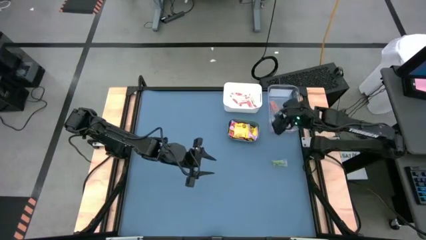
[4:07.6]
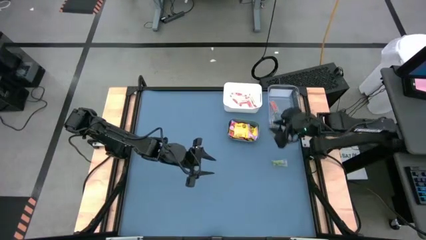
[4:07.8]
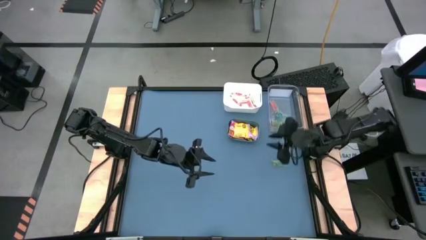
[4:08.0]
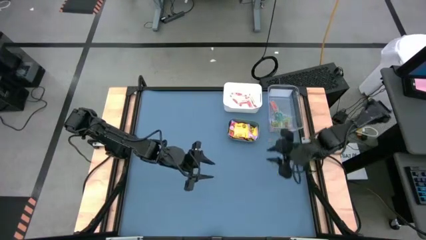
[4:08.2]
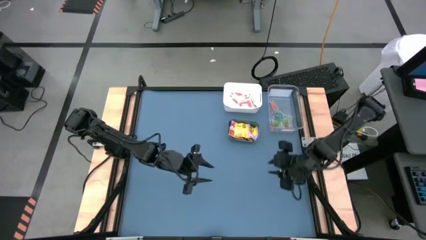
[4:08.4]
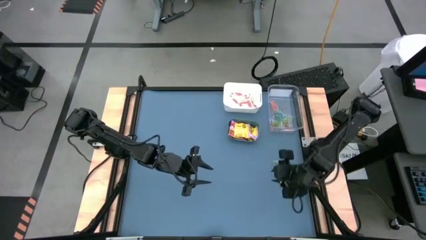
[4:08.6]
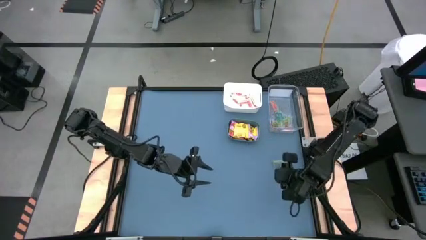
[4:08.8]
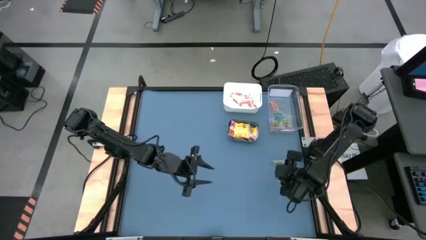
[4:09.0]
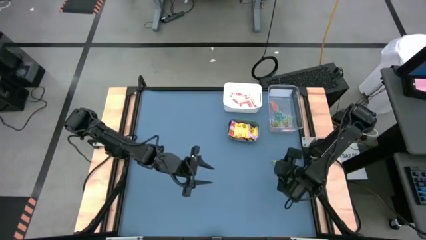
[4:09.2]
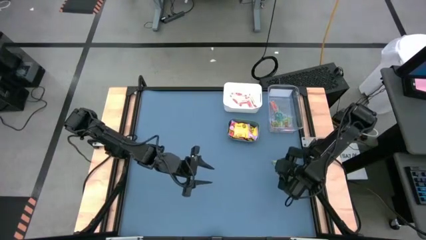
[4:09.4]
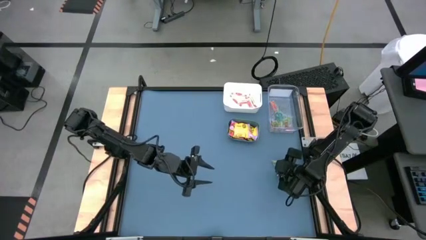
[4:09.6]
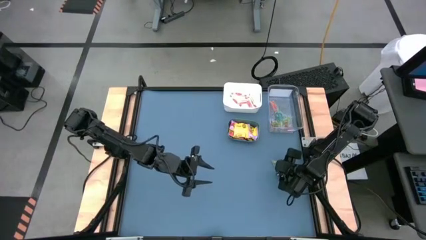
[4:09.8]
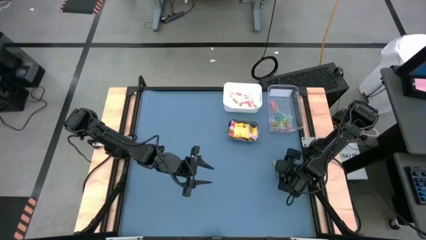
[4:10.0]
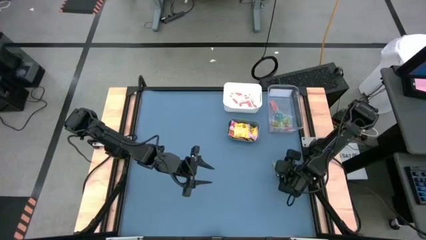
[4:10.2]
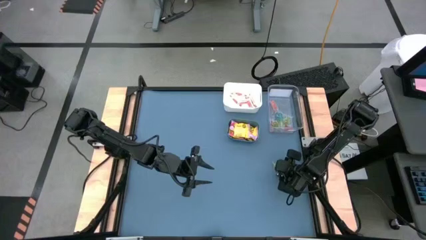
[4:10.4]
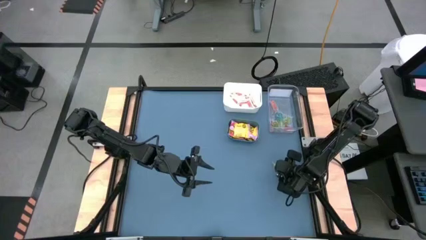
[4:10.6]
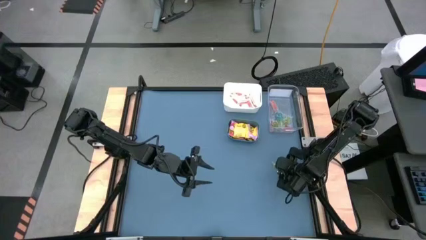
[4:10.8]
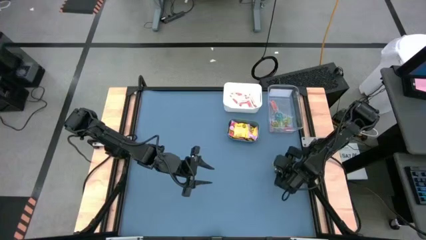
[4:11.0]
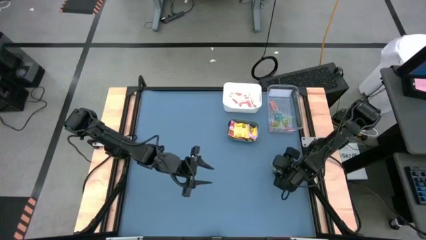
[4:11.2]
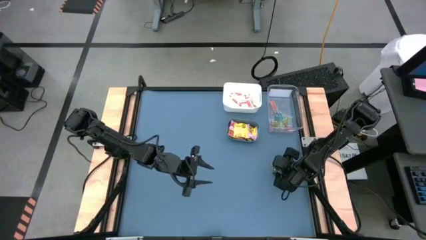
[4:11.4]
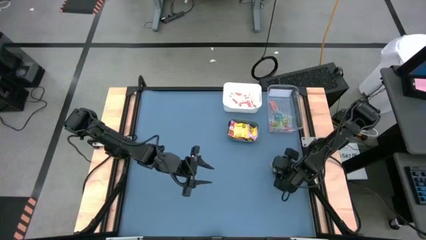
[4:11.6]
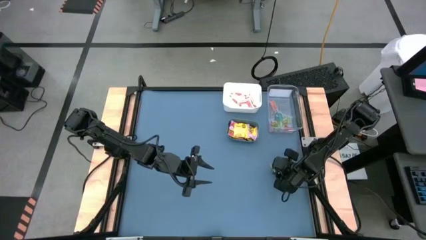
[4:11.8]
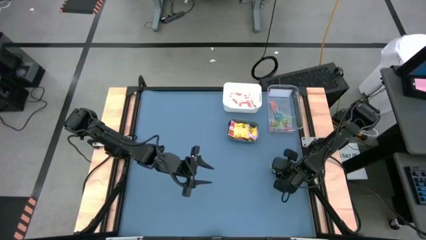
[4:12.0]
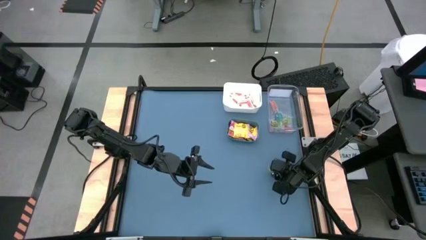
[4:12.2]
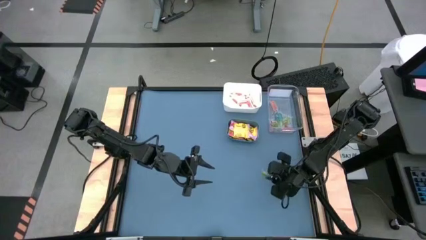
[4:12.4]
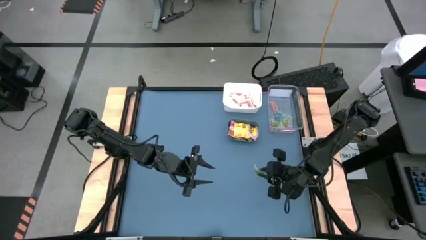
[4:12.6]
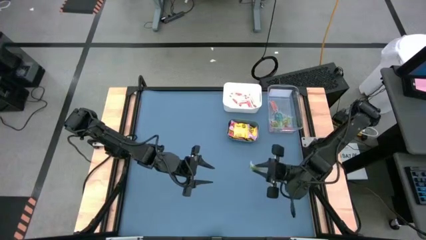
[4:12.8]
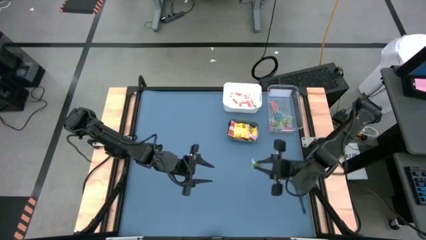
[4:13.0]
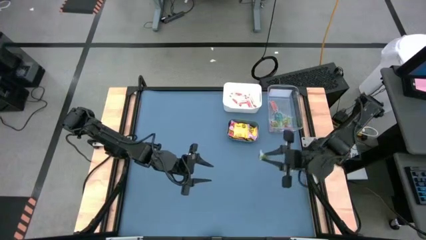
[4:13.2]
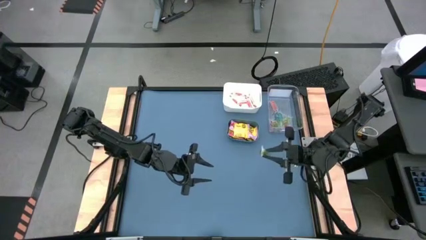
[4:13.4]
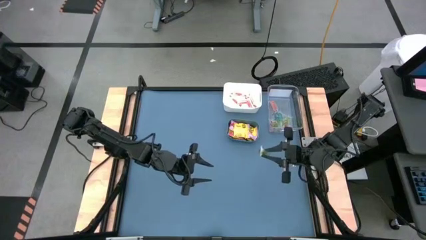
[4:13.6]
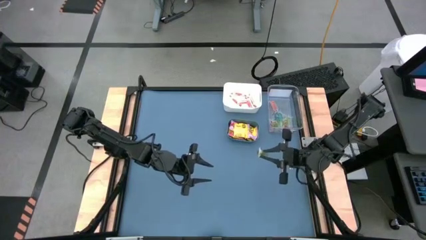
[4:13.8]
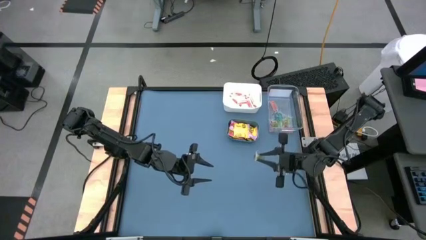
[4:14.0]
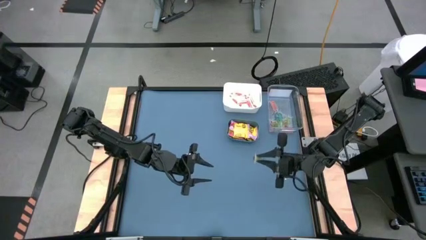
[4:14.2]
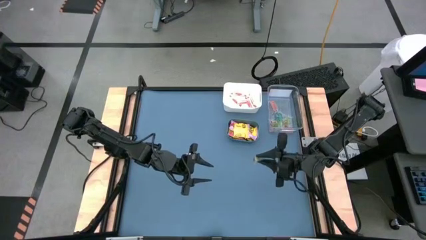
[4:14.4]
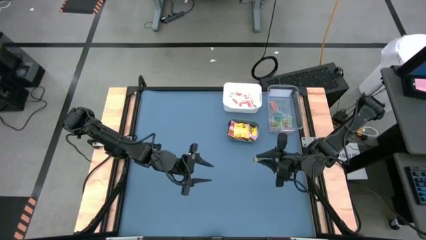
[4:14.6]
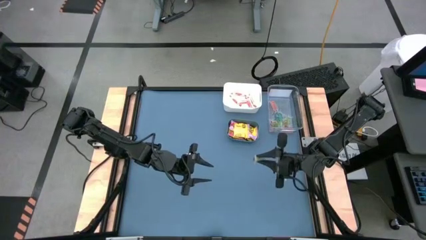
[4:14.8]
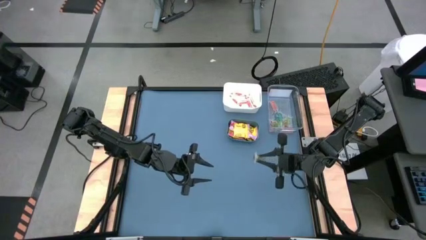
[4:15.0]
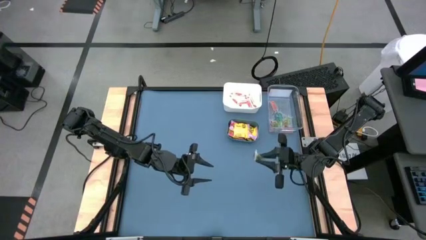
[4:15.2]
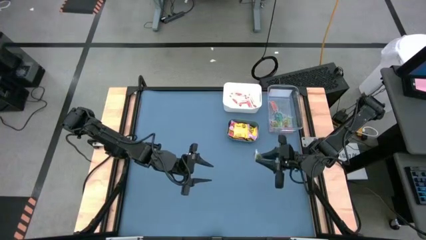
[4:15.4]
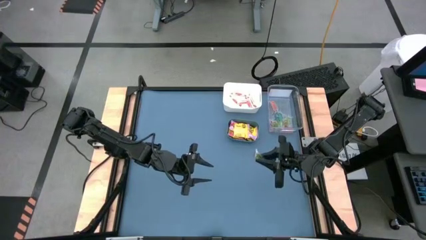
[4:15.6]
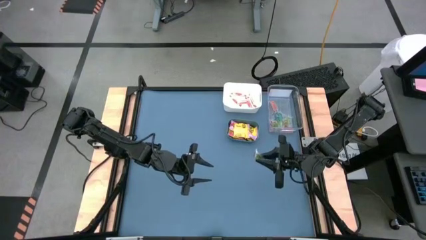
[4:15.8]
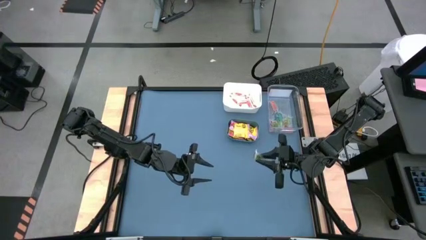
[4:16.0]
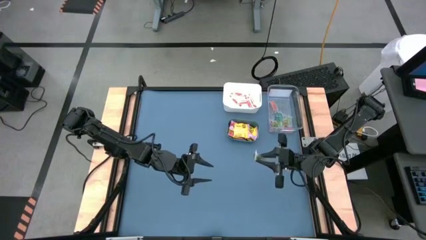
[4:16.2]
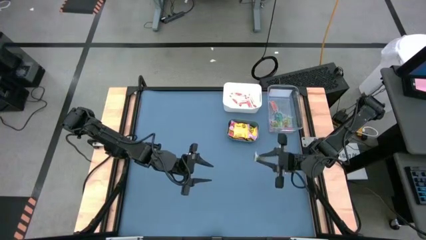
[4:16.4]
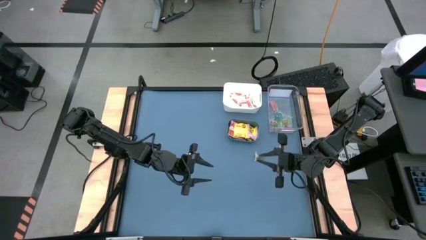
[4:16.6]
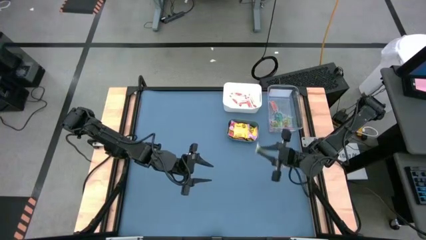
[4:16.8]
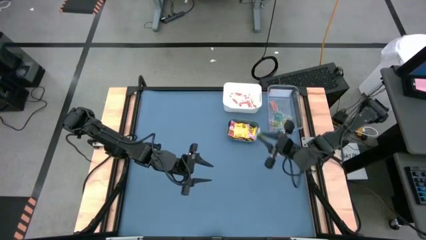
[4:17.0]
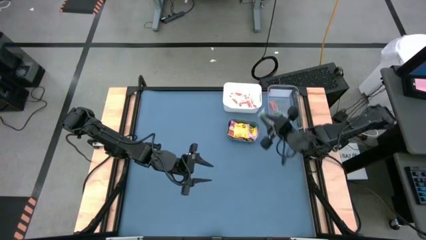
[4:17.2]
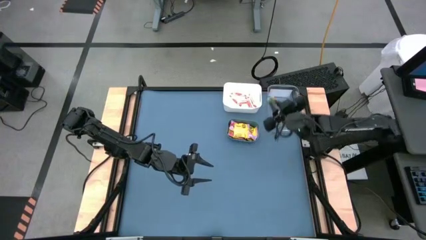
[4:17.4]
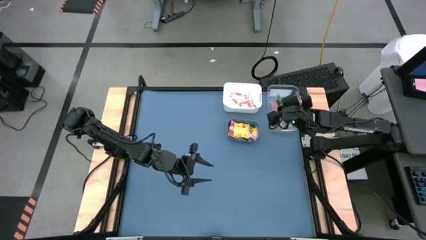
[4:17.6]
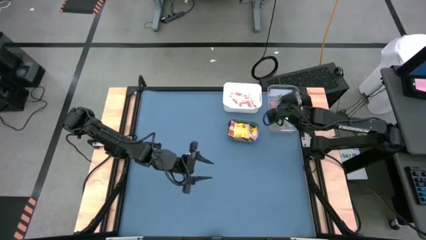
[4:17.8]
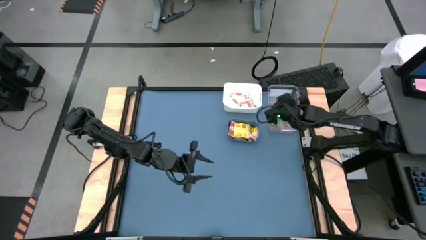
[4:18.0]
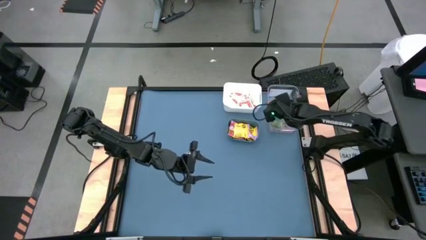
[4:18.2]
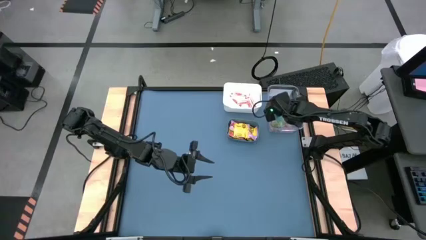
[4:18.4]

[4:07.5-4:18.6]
Task: Sort candy
Put the green candy into the transparent bin

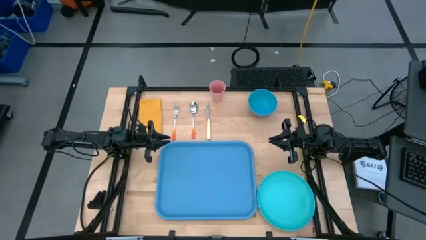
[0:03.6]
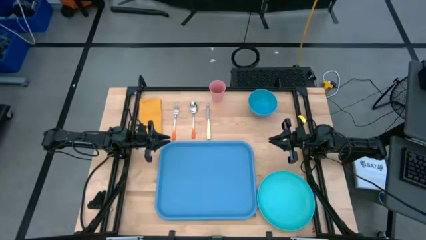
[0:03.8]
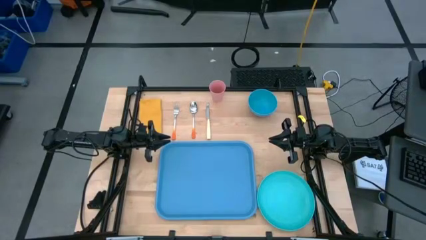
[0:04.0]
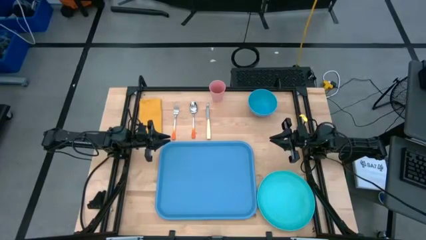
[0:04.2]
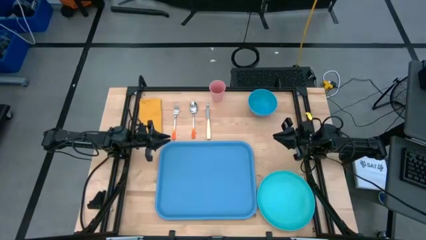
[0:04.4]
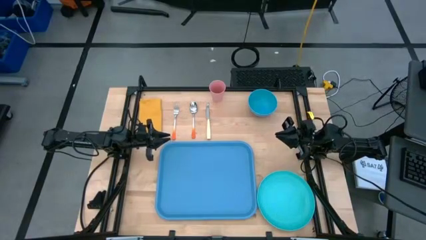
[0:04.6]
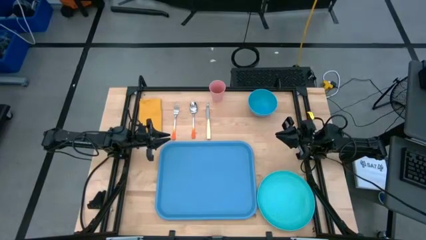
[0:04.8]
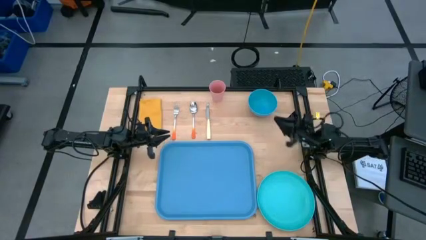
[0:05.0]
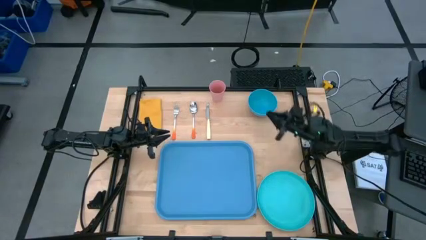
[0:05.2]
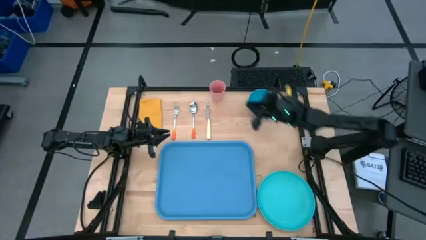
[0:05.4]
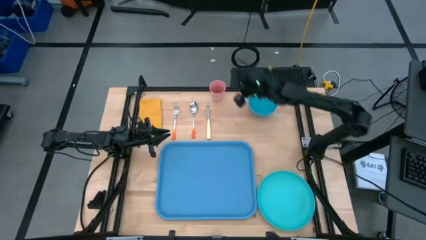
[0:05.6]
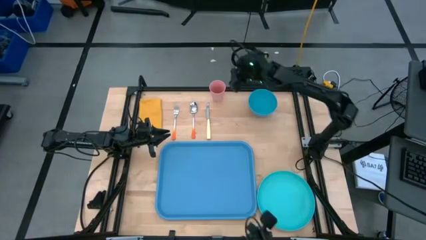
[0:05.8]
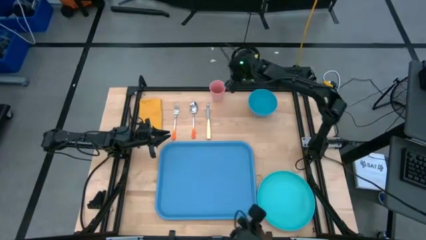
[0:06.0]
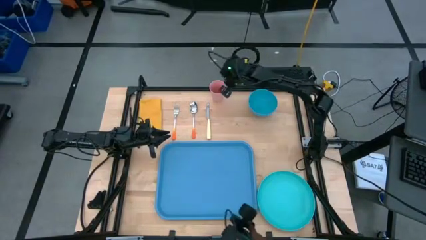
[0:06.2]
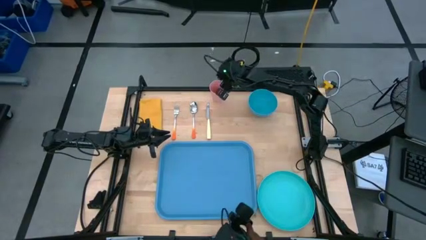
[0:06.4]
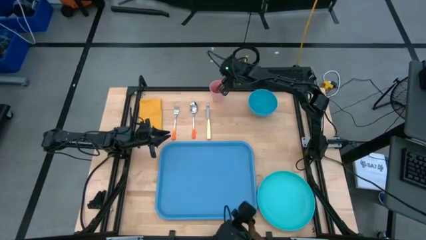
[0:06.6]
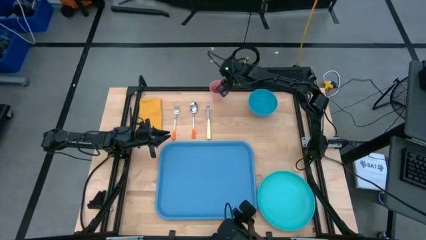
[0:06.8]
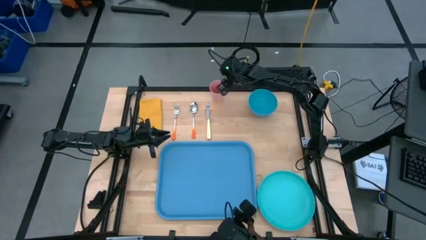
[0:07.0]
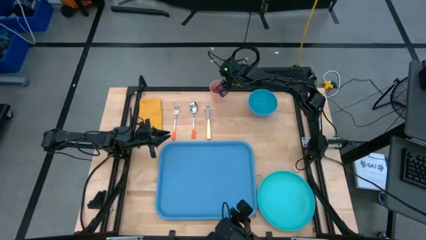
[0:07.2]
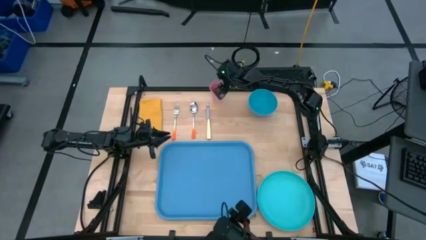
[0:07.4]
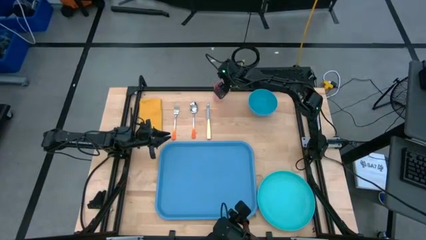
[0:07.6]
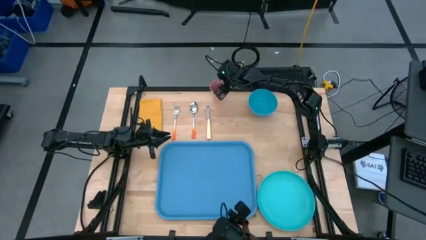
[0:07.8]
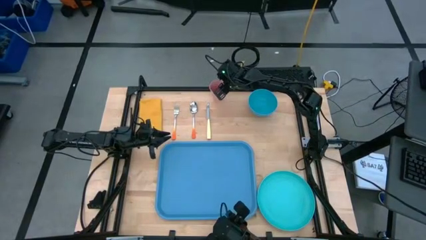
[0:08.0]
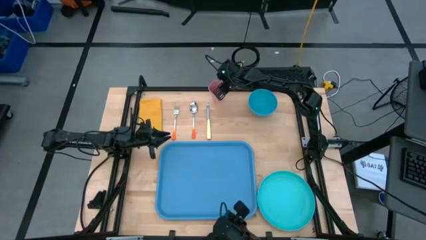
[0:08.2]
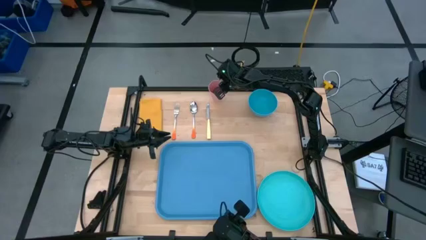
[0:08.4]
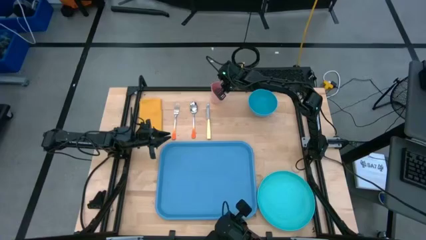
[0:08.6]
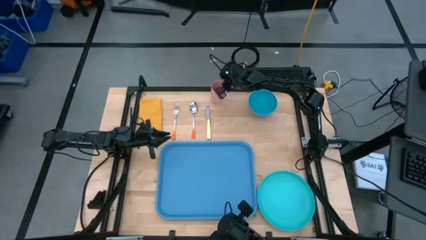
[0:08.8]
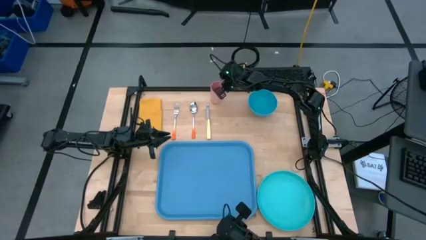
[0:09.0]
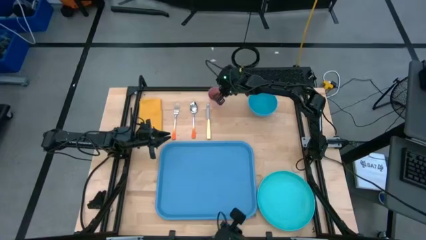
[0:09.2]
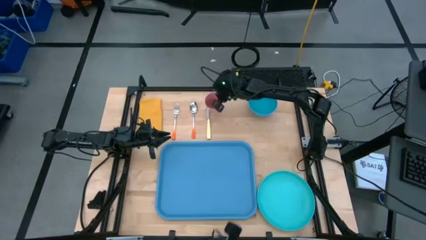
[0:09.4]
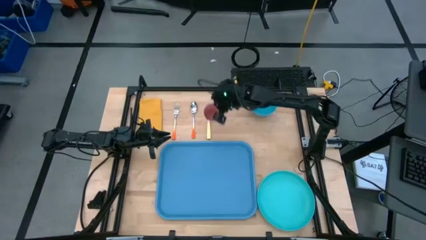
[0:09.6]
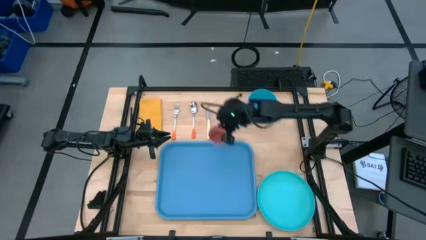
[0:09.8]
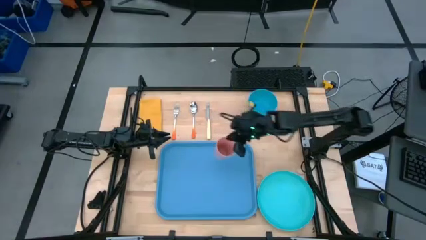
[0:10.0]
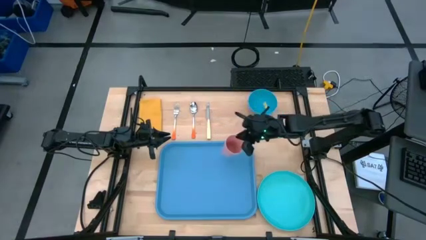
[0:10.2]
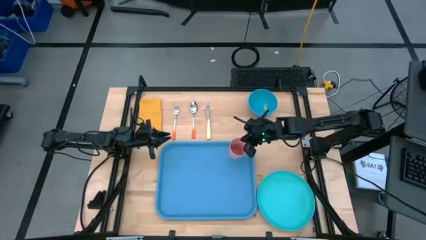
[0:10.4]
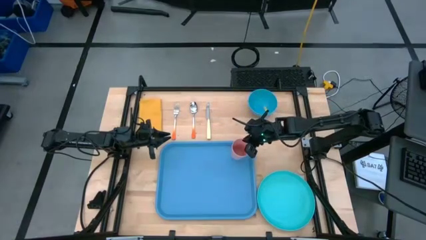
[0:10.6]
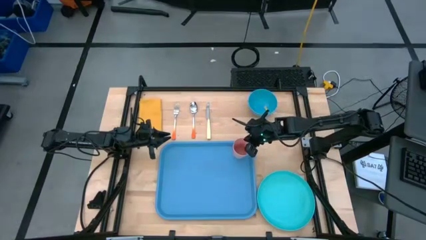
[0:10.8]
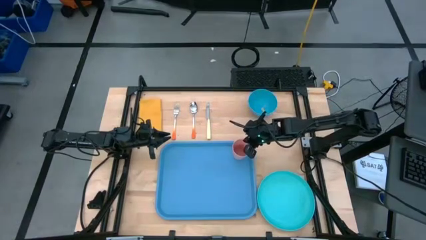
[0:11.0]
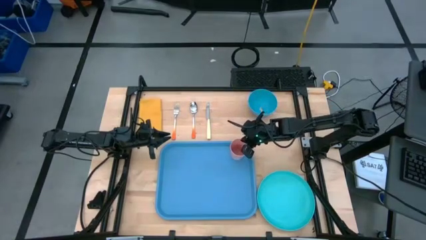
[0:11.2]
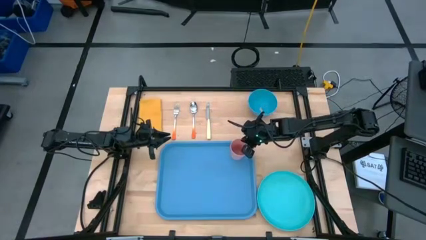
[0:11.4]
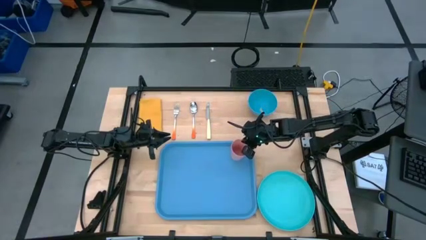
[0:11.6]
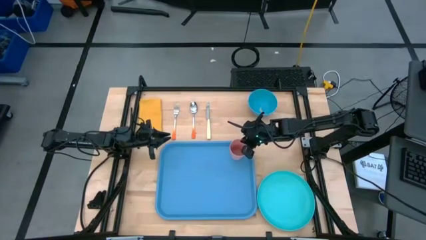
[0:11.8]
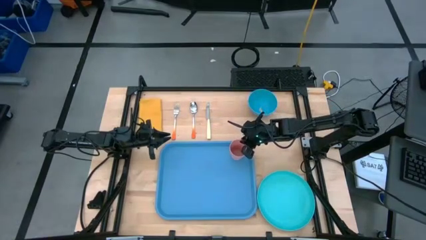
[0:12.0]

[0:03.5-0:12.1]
Task: Set up tray
Put the pink cup on the blue tray
